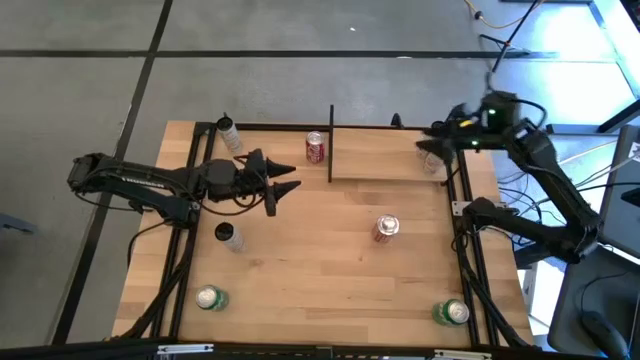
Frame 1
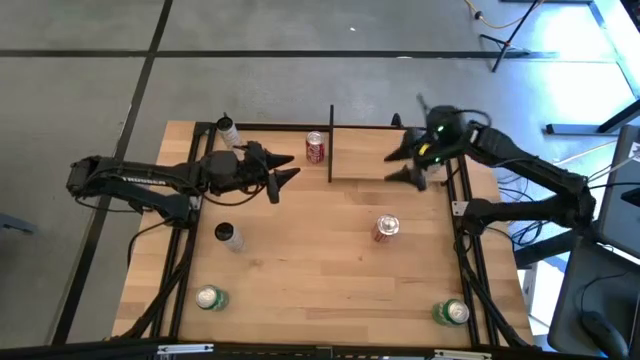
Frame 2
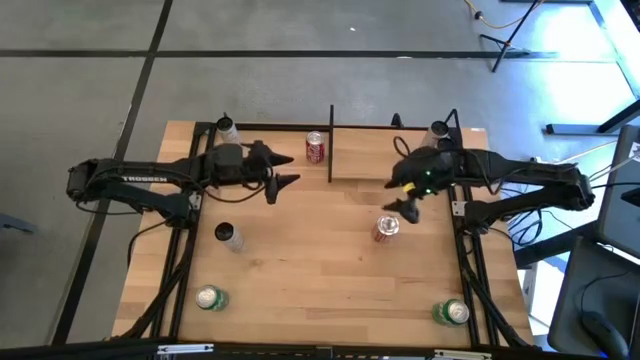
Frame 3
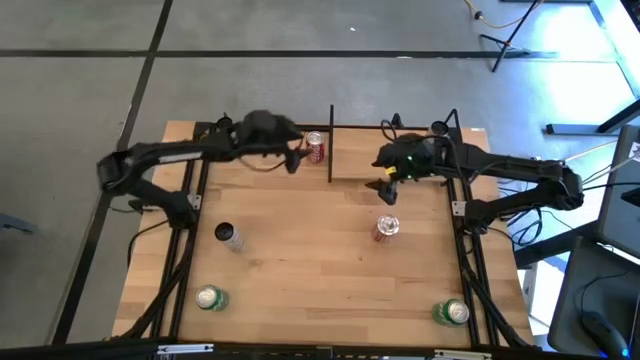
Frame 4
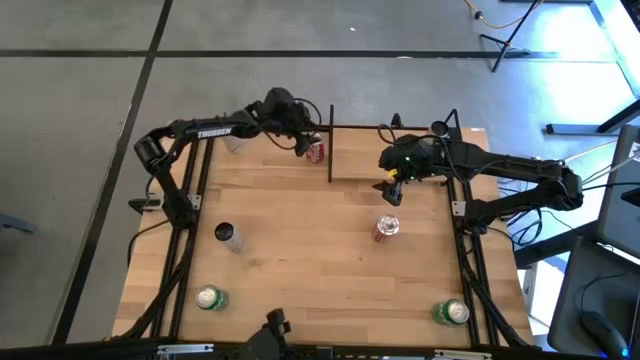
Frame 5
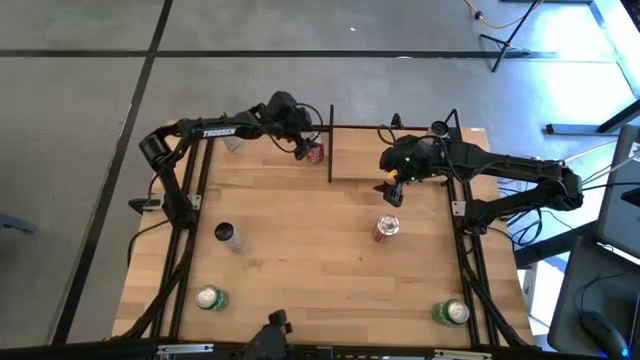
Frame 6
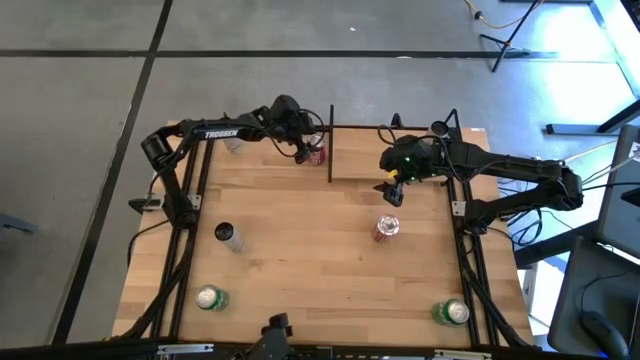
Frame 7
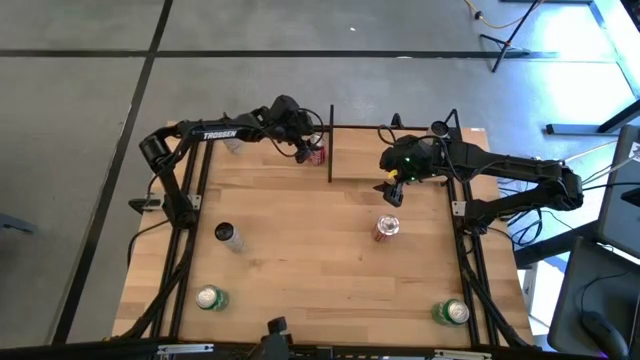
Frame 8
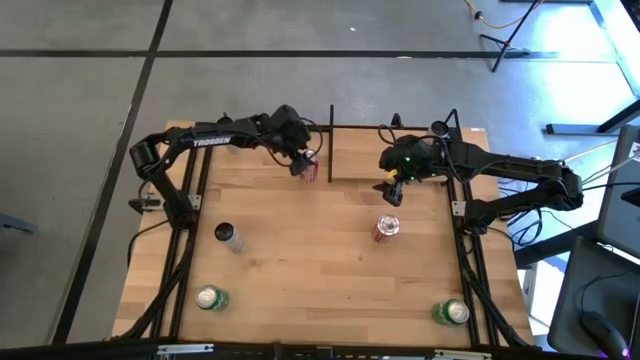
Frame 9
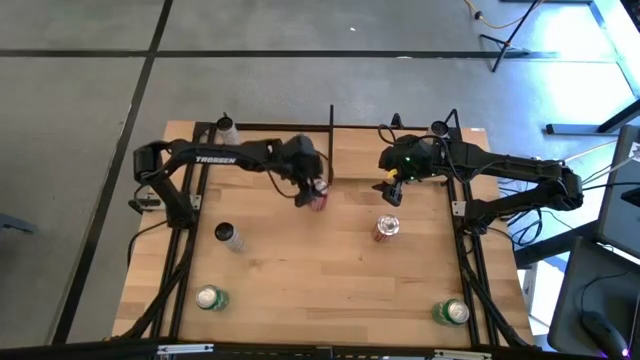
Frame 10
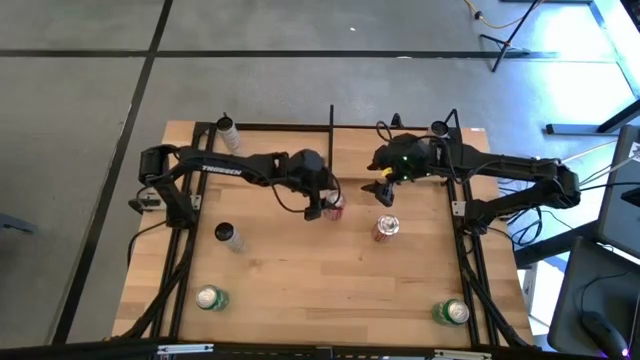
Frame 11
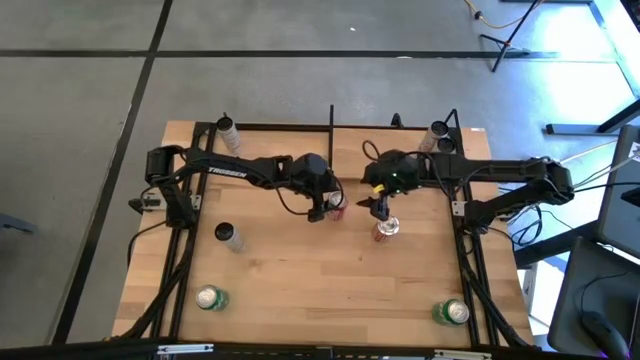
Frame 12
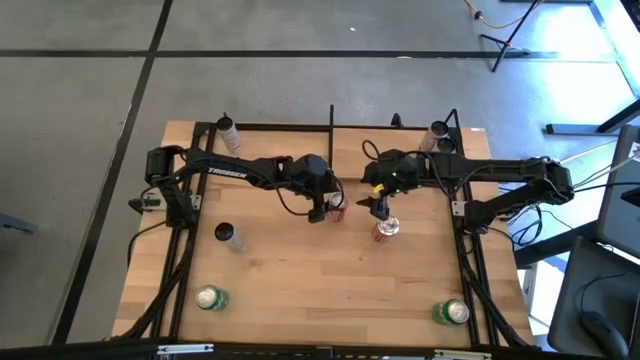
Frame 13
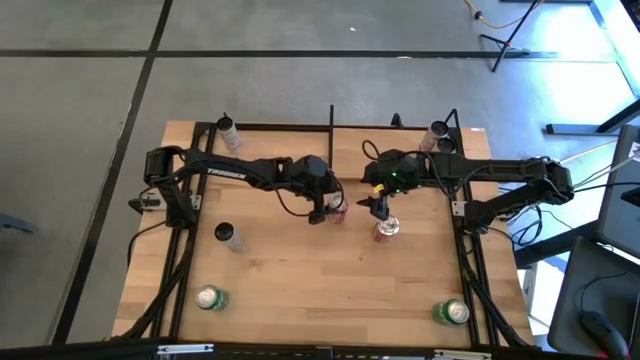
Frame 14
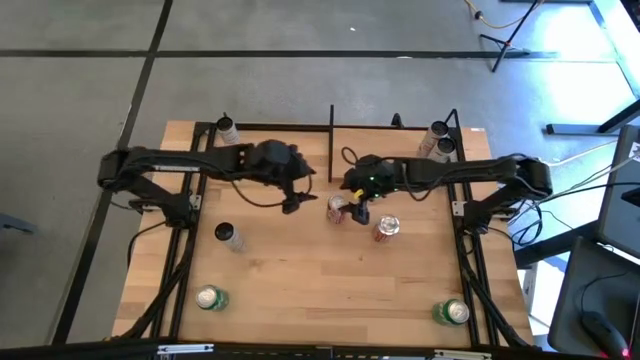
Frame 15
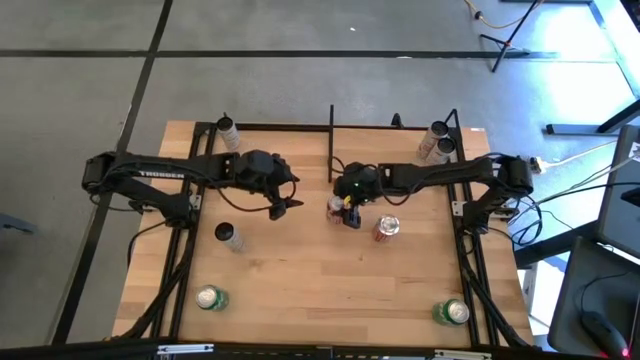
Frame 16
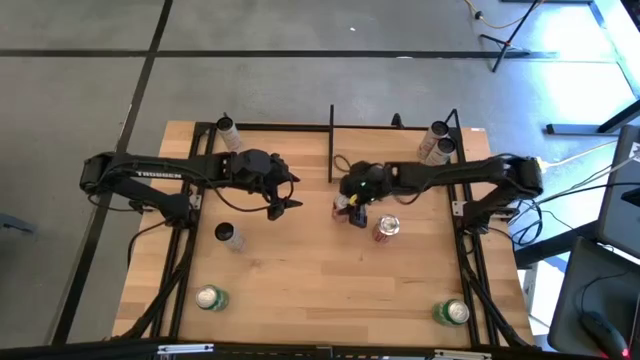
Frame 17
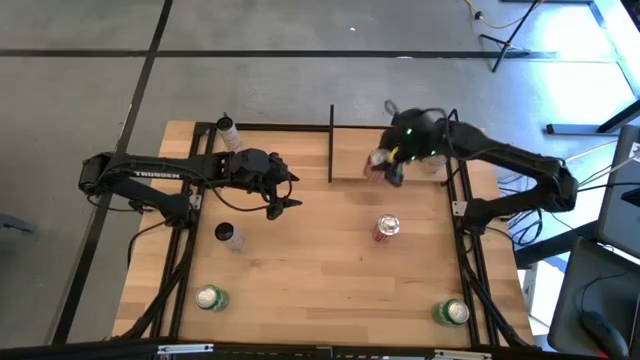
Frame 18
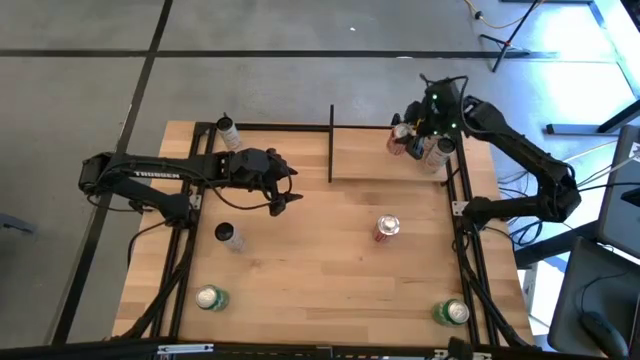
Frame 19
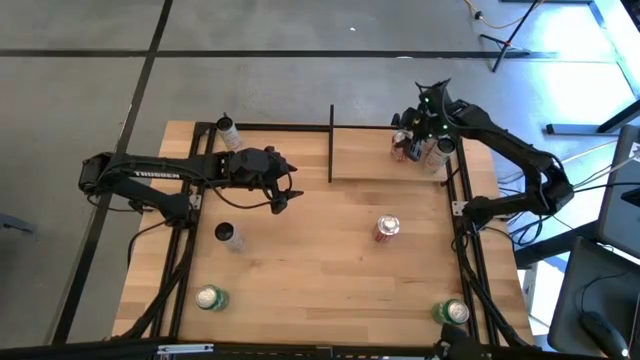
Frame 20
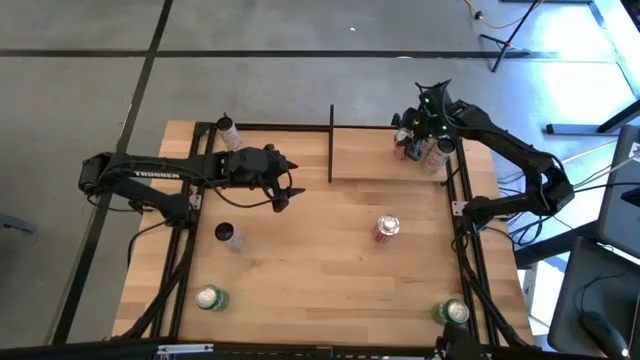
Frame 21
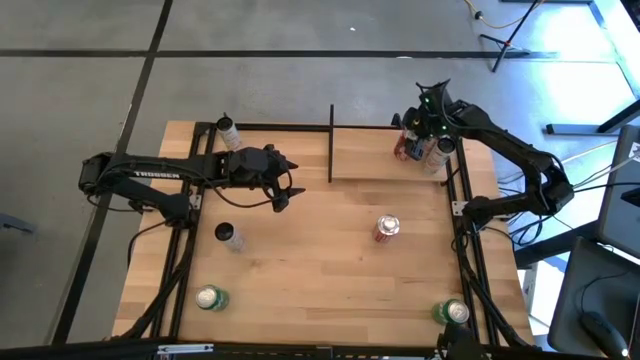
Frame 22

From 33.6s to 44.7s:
Task: Place canned beverage on shelf
Put the top red soda can on the shelf

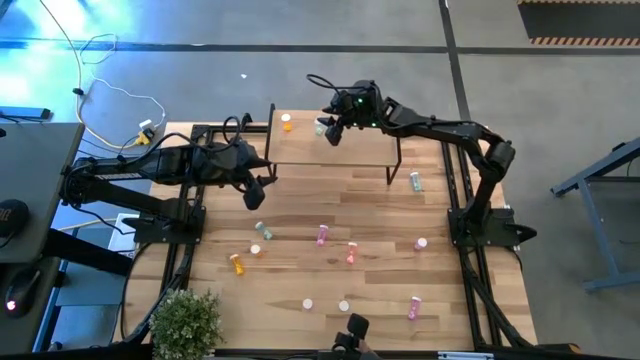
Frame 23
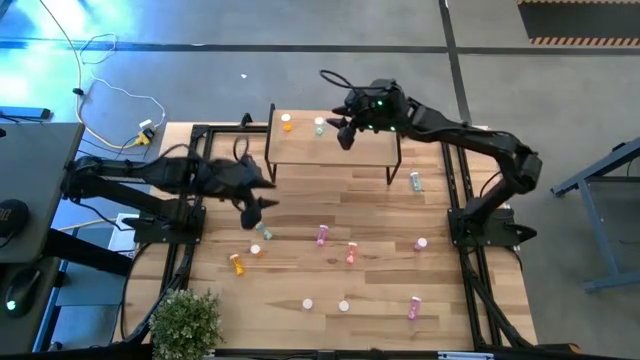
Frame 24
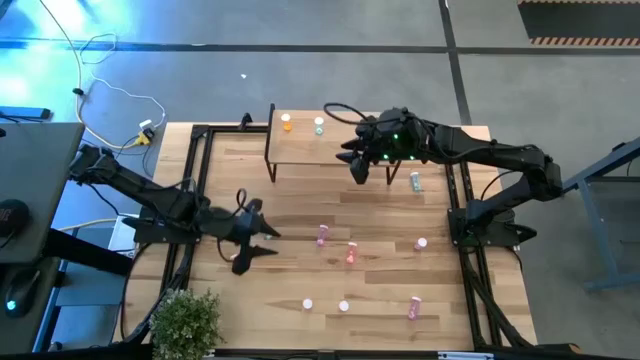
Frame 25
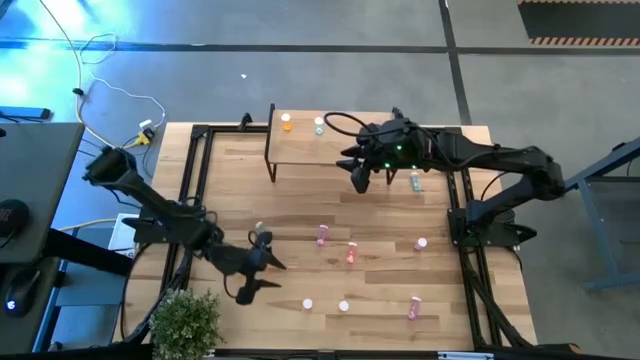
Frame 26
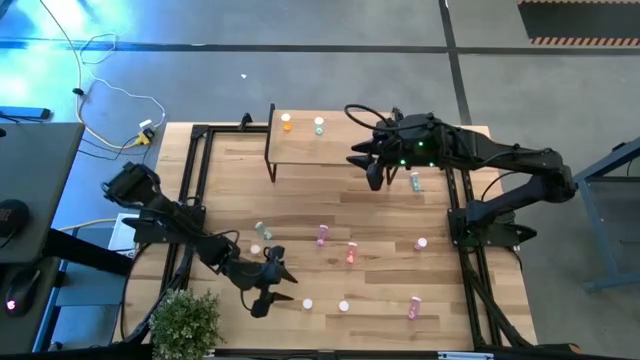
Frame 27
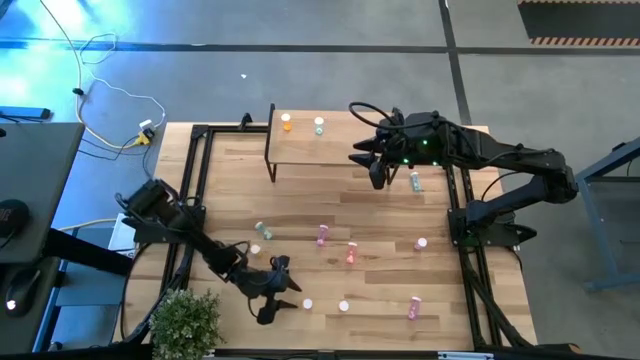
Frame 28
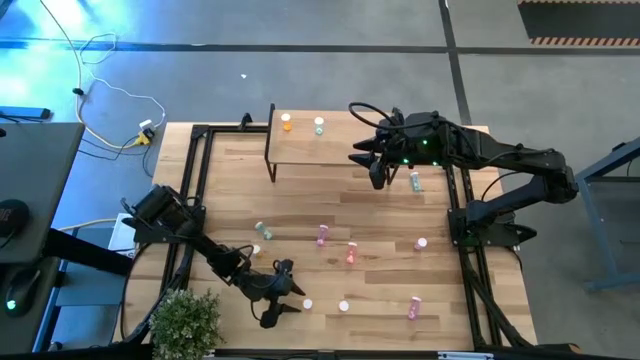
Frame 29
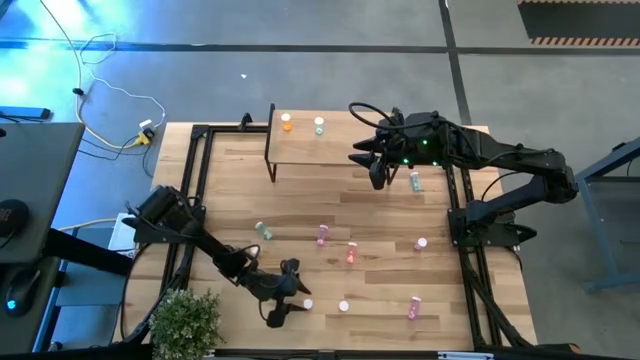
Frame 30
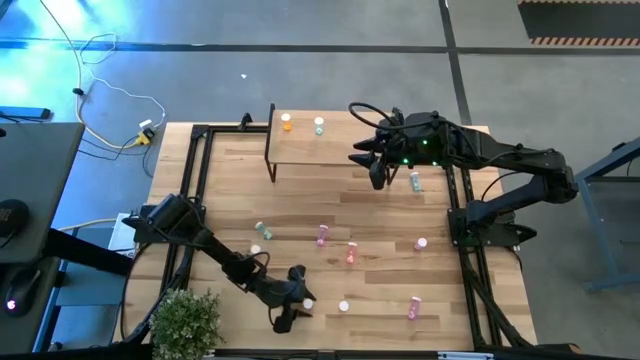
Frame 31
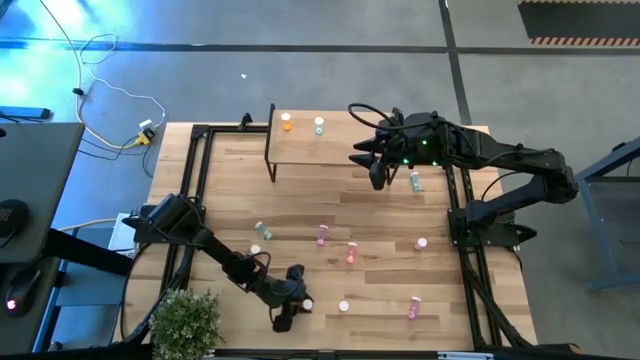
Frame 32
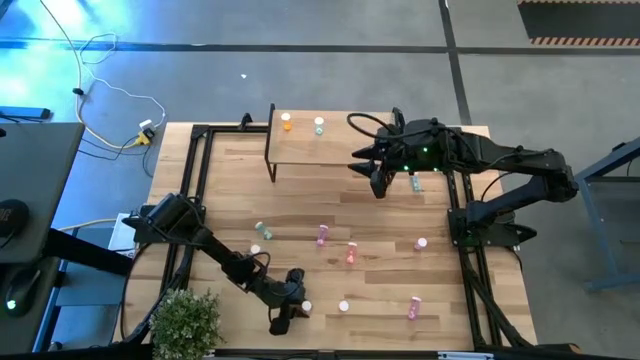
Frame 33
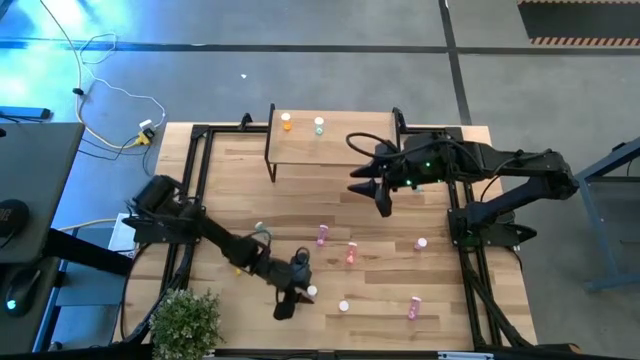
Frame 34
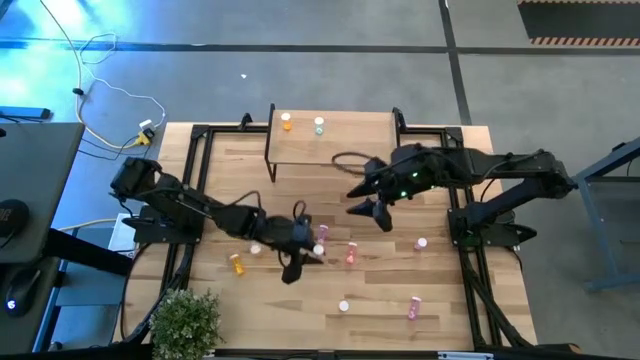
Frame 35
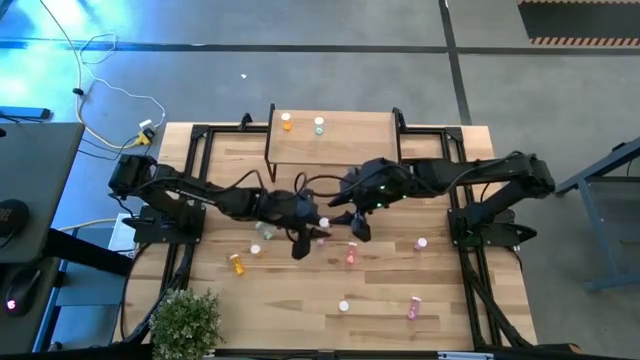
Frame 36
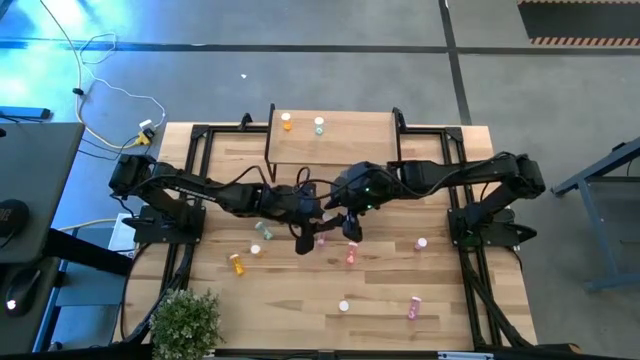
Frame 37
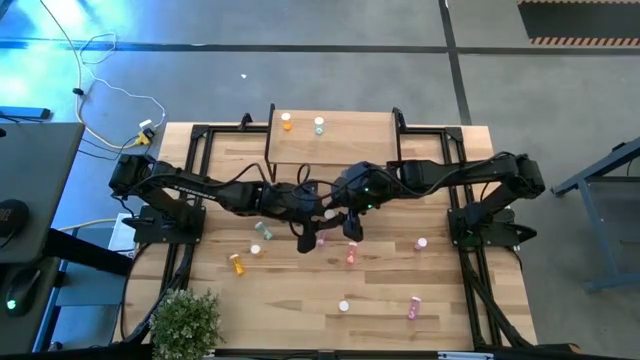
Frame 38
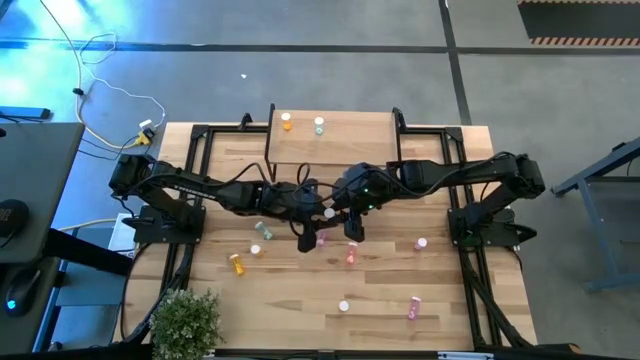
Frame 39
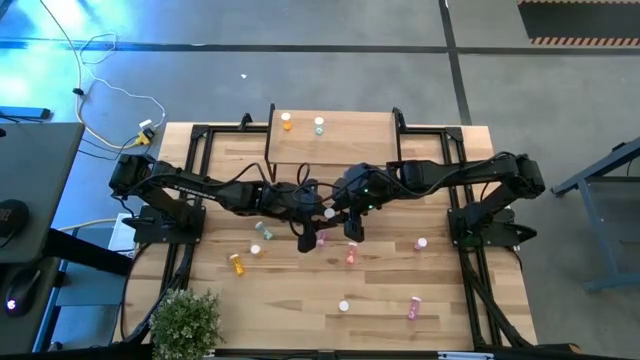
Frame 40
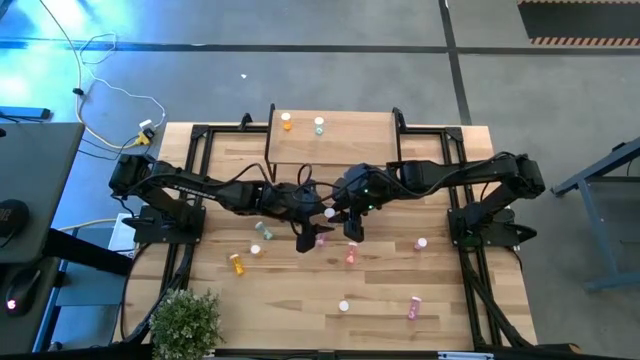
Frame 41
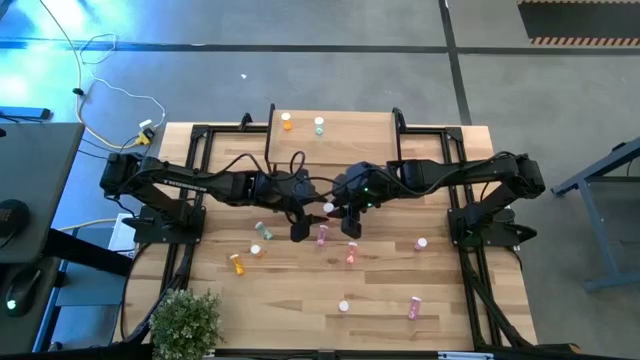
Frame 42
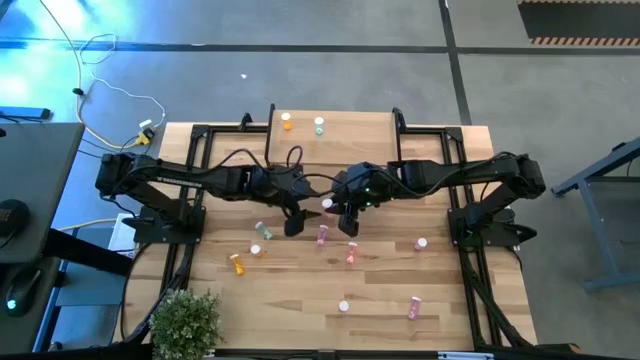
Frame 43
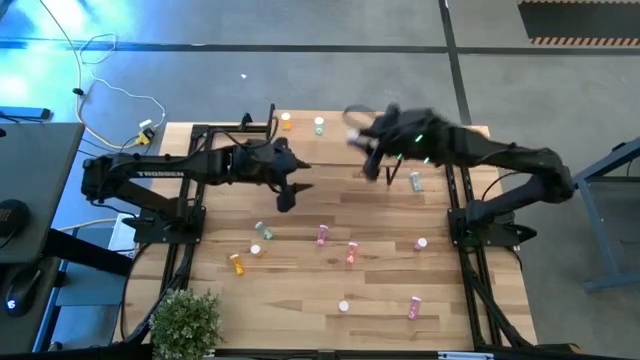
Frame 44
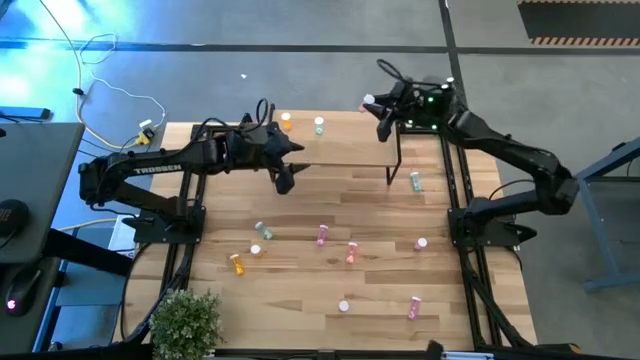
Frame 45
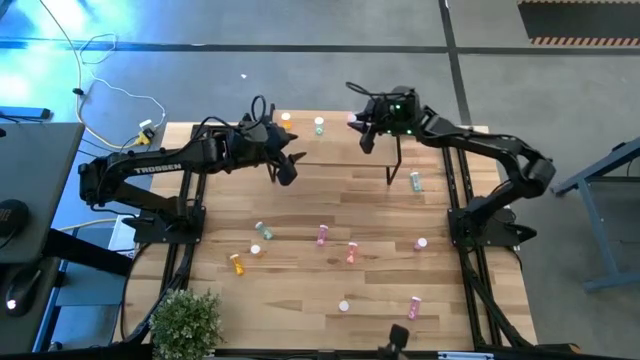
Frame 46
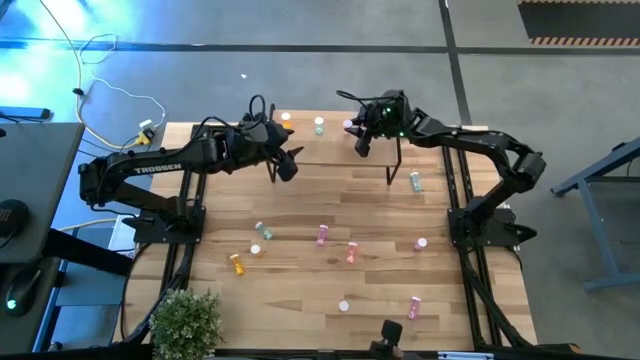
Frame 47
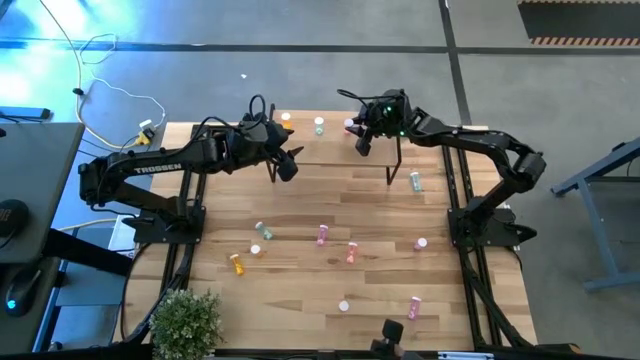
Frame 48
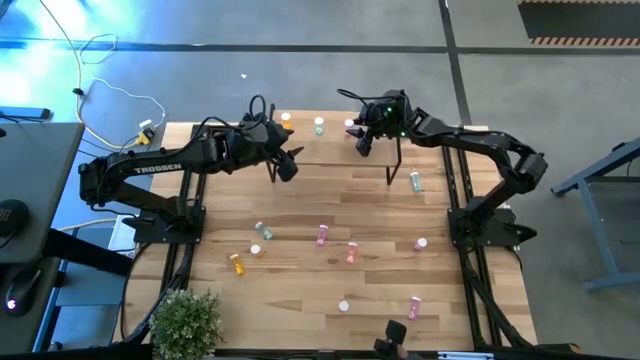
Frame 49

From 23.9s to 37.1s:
Task: Pick and place medicine bottles onto shelf by color
Put the bottom left pink pill bottle on the shelf
